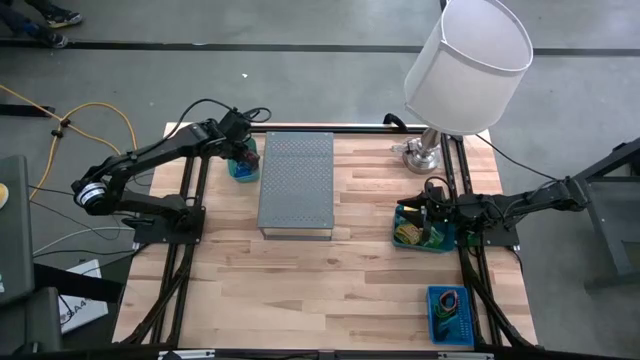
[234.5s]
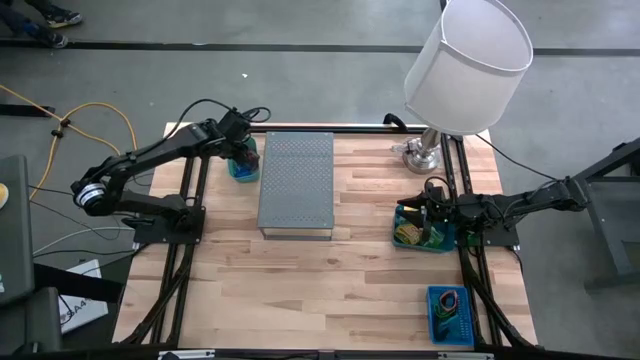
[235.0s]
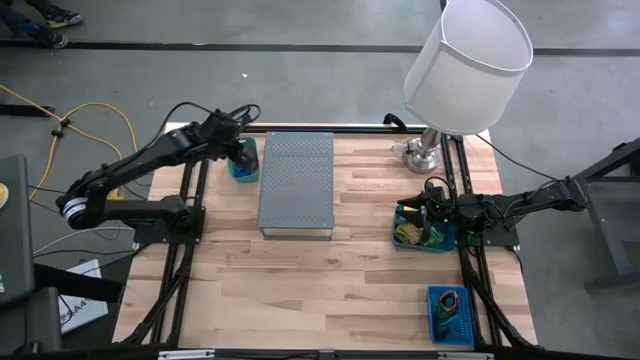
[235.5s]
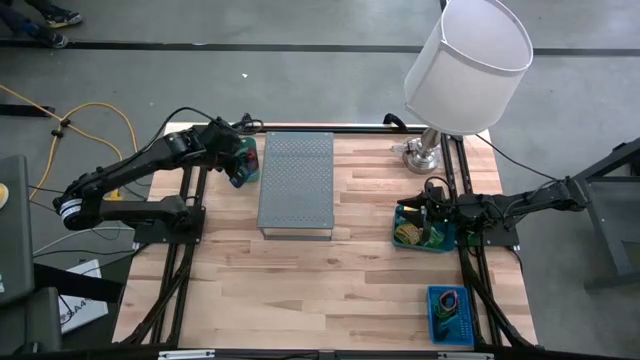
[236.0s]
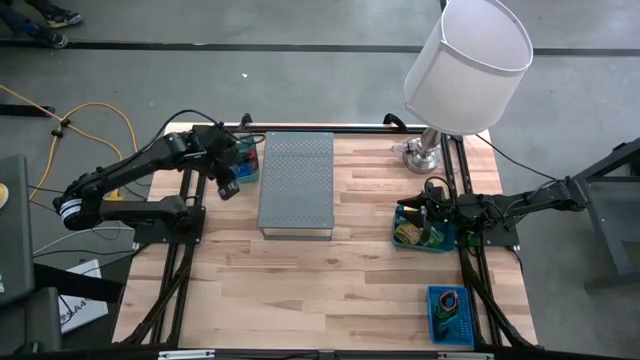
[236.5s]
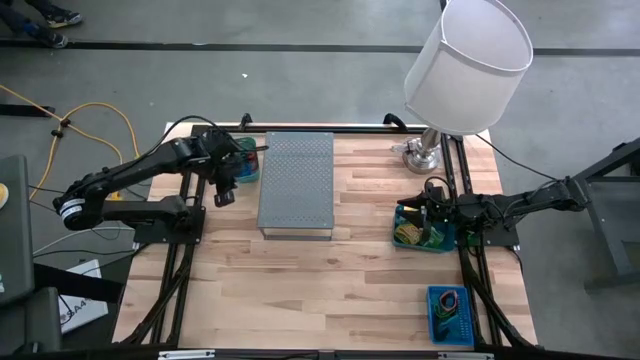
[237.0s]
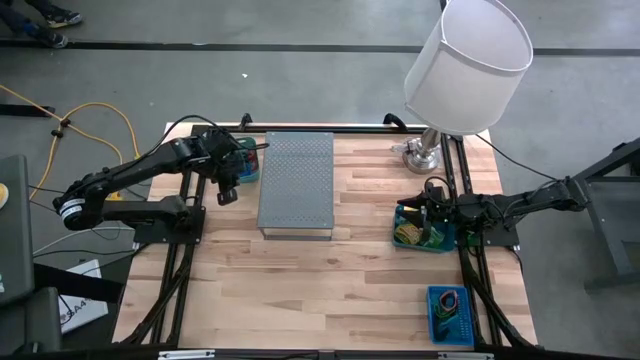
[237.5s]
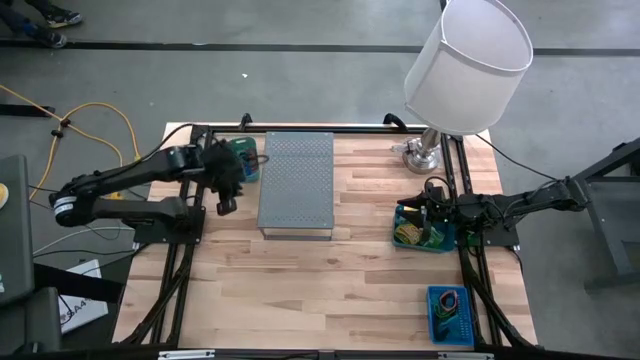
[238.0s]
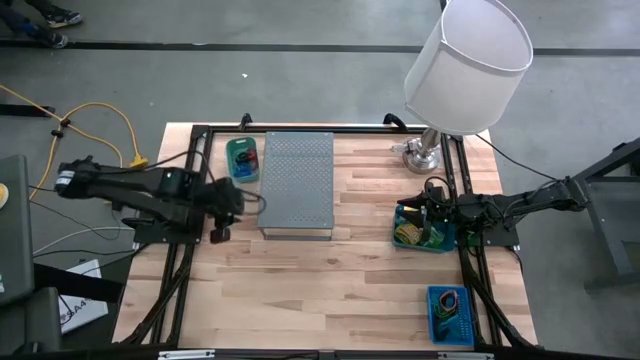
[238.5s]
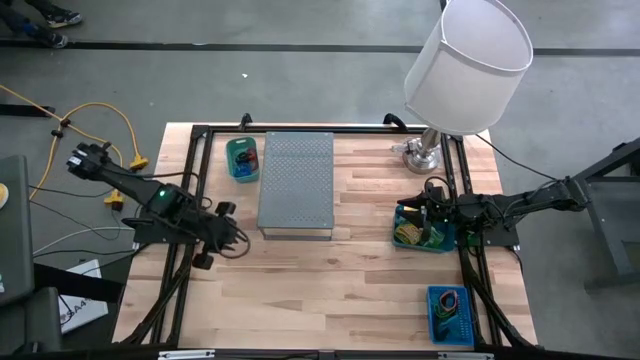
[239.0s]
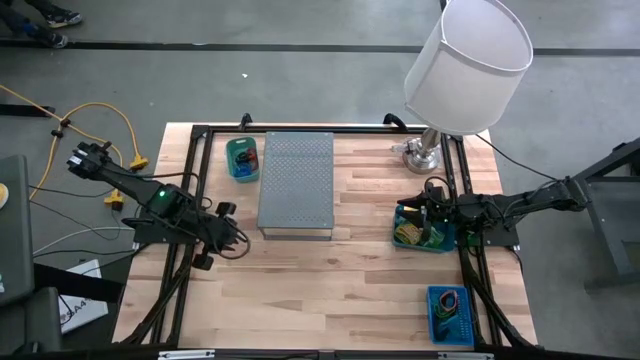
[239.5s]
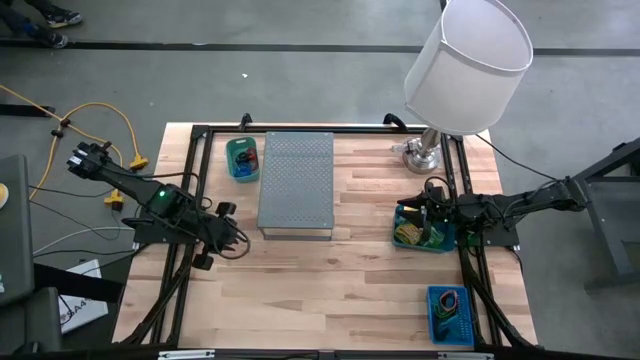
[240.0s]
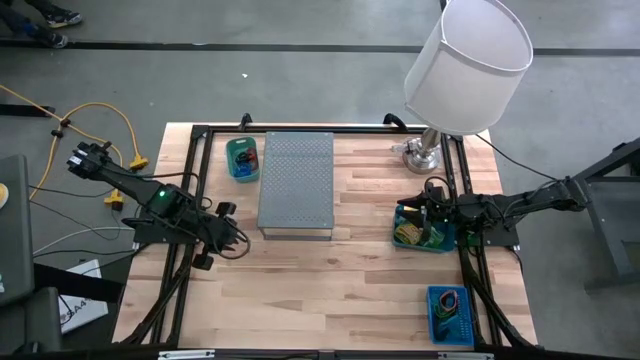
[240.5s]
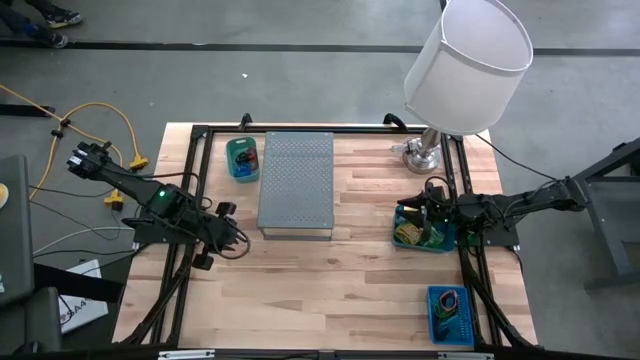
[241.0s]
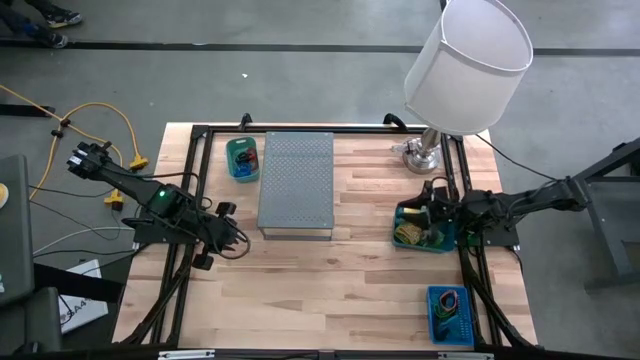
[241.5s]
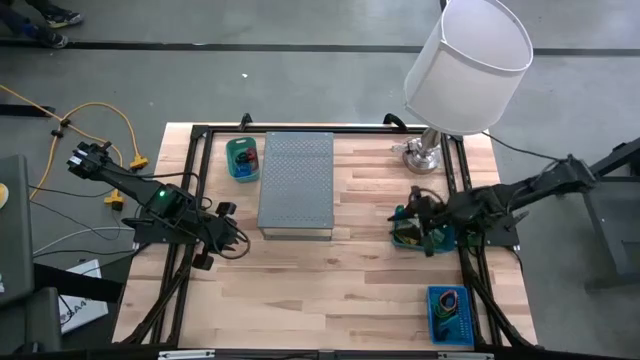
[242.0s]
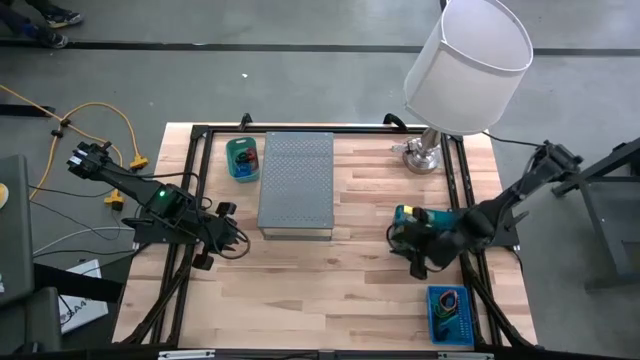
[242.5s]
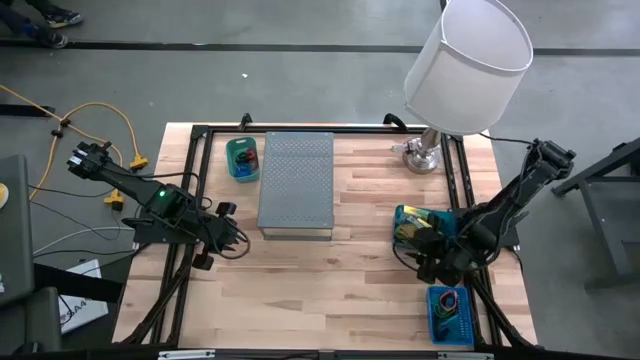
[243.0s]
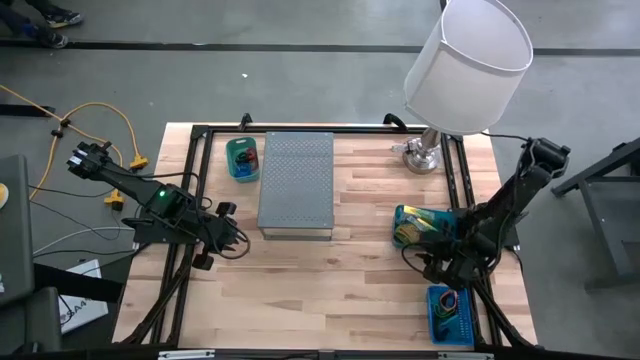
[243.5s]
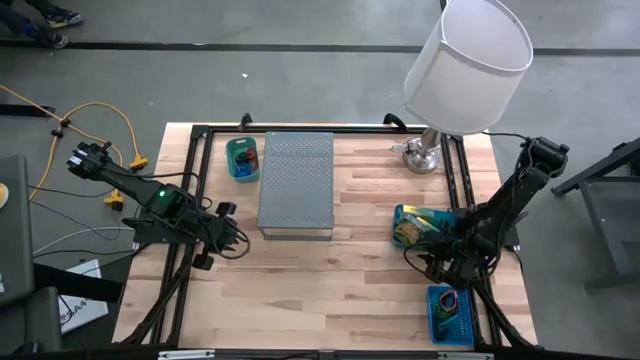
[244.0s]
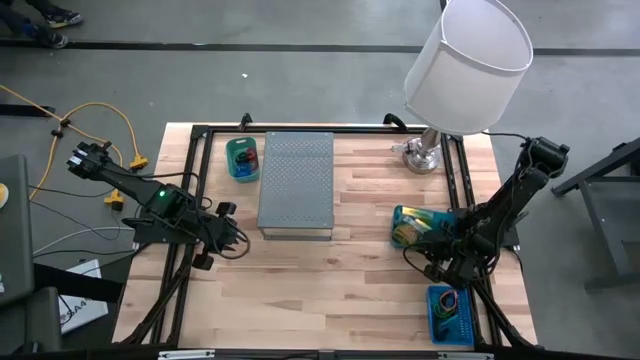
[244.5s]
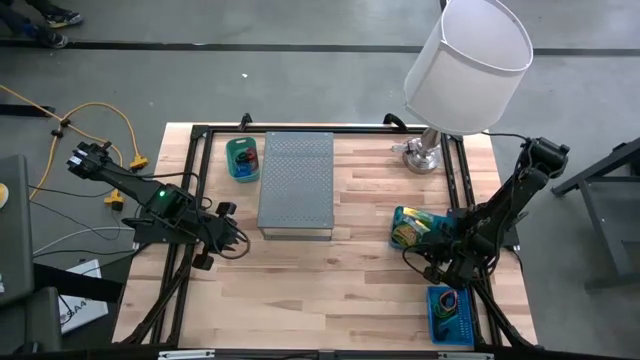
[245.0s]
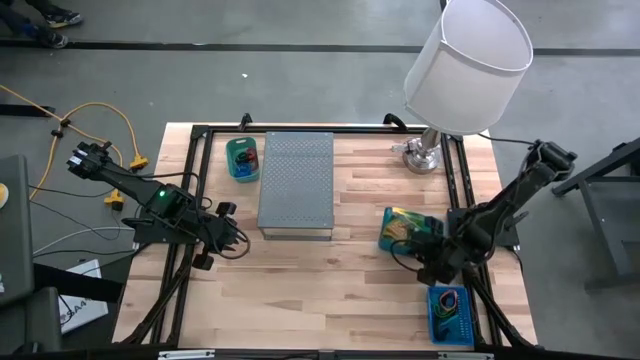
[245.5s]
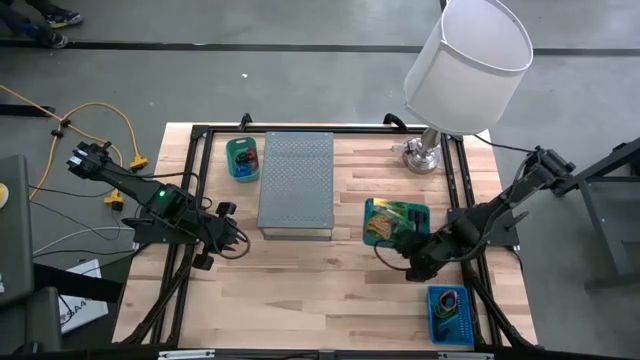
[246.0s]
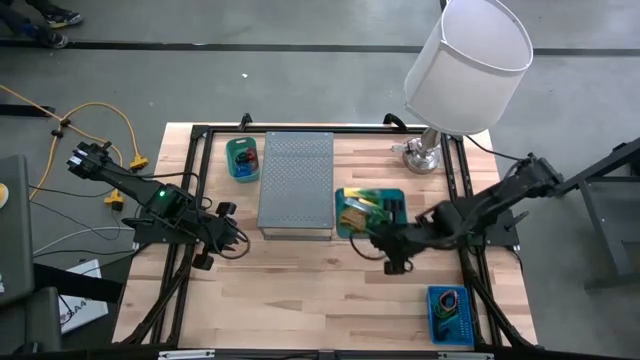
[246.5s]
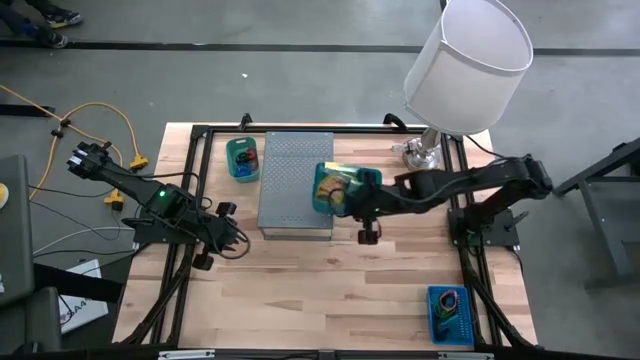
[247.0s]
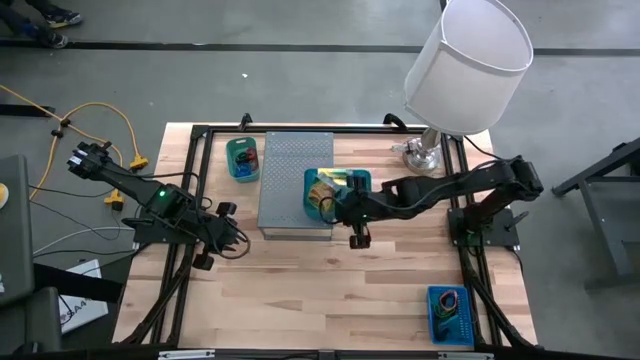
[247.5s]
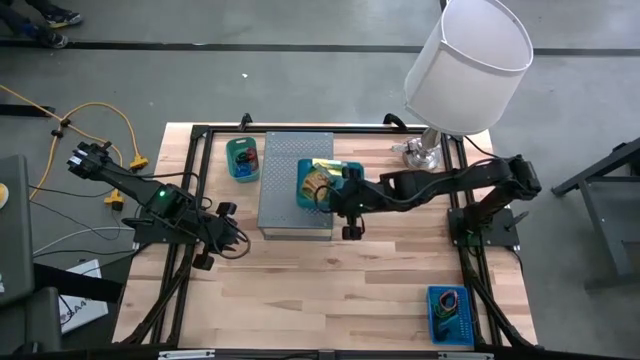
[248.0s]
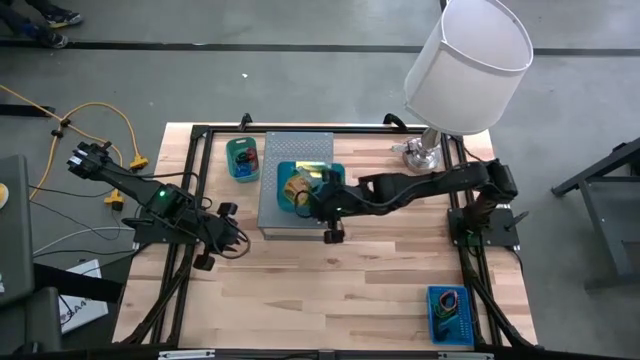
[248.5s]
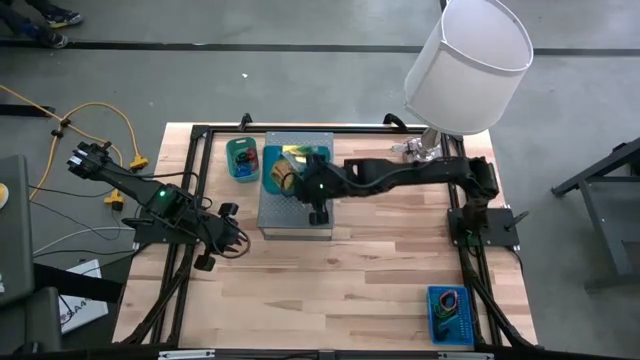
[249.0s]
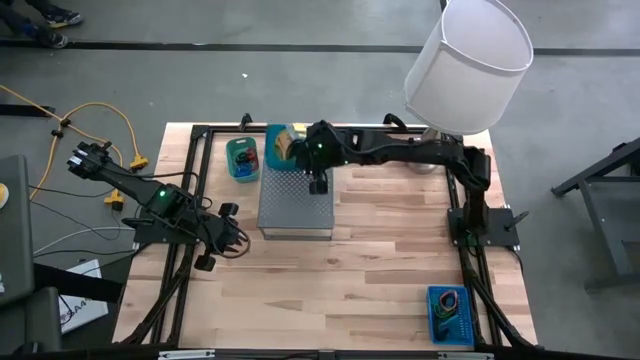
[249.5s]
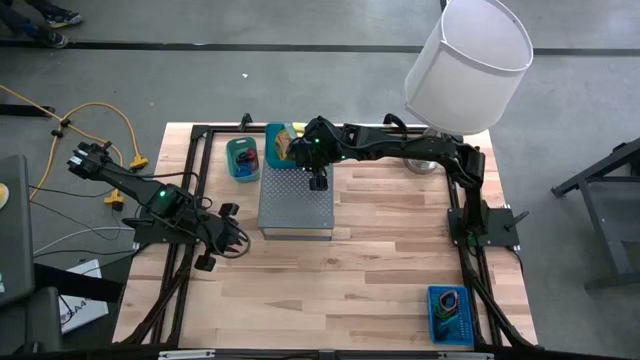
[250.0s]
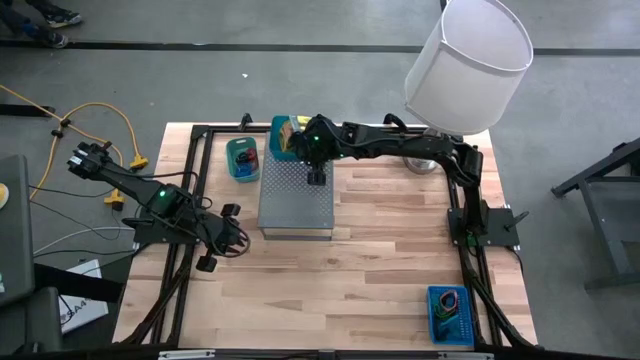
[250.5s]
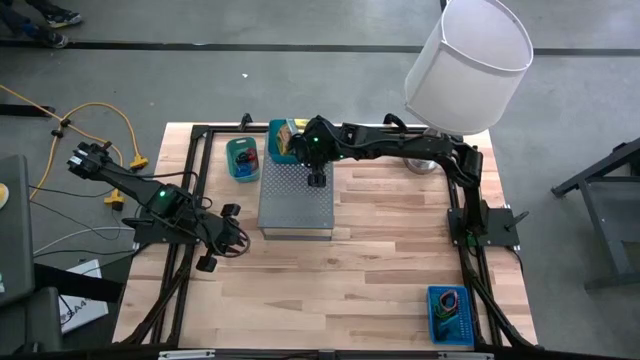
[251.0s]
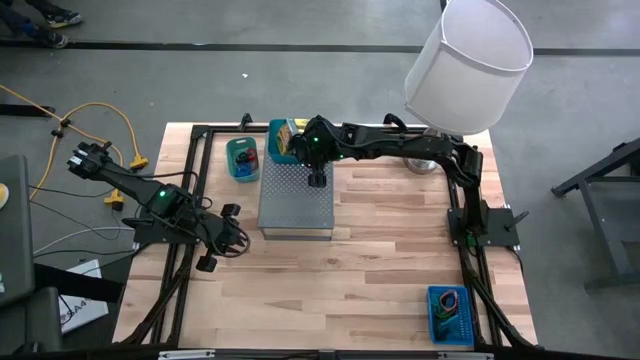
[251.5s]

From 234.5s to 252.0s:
Task: Pick & Place Office Desk Supplies
Put the blue bin with crayon boxes on the shelf

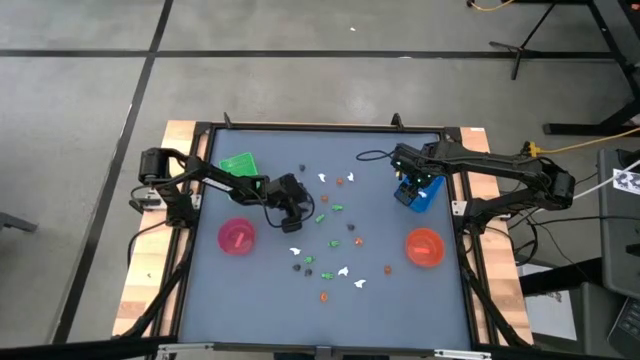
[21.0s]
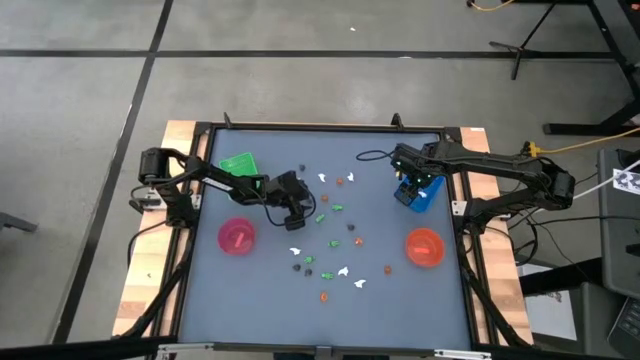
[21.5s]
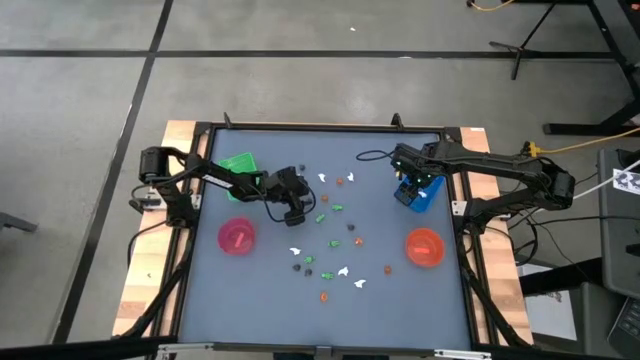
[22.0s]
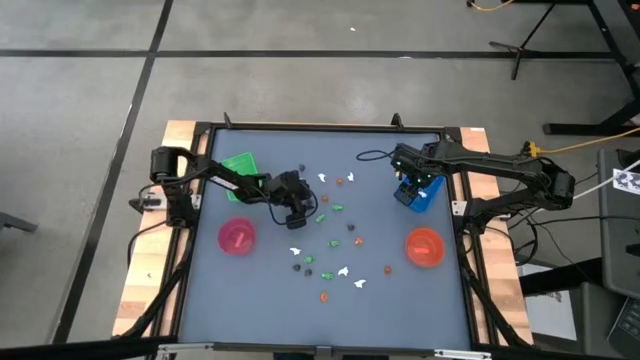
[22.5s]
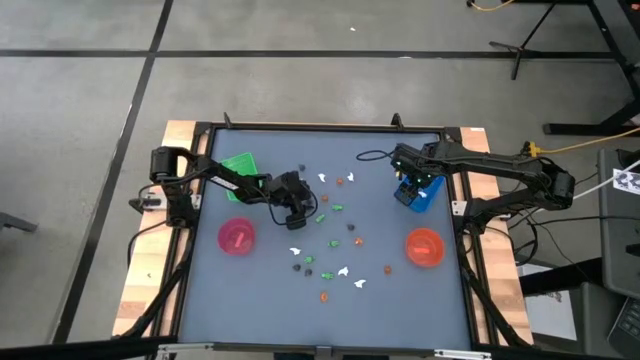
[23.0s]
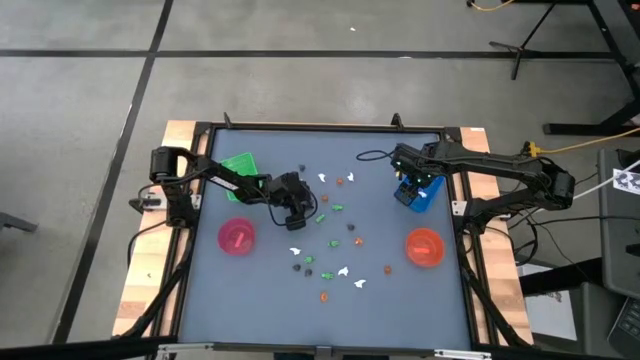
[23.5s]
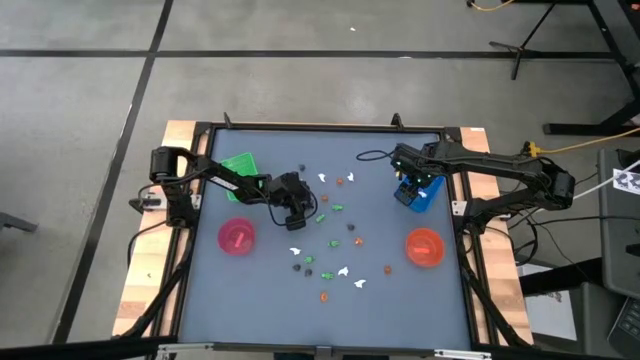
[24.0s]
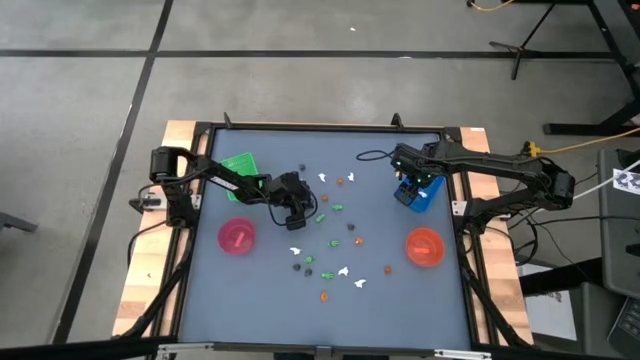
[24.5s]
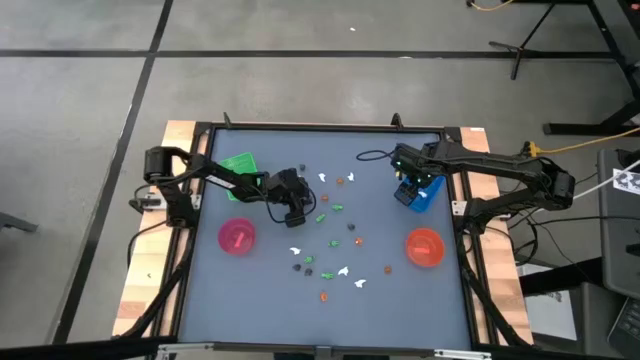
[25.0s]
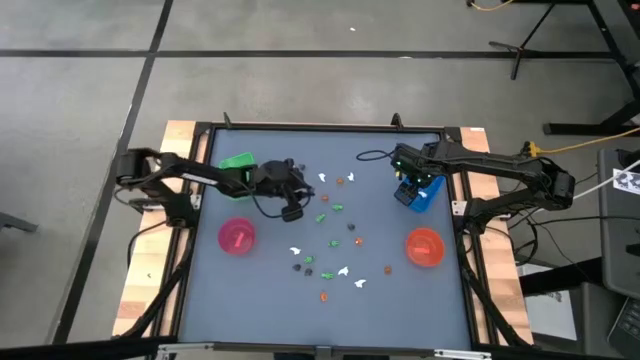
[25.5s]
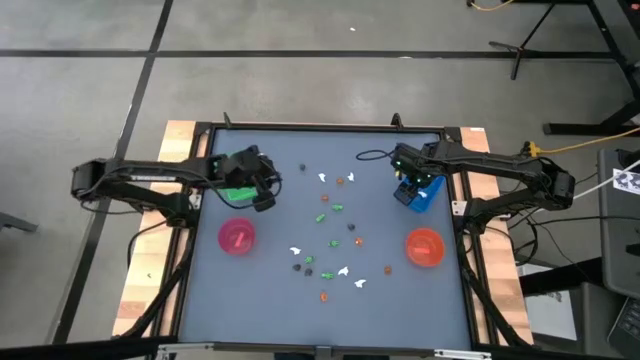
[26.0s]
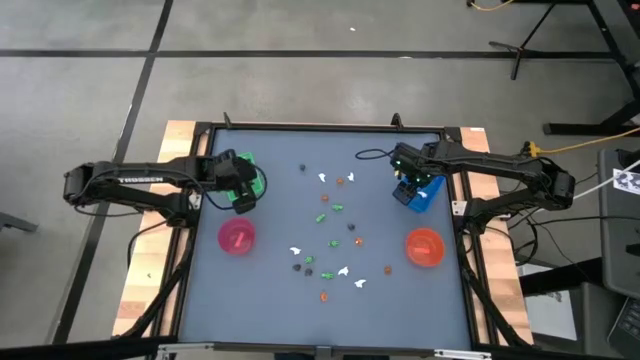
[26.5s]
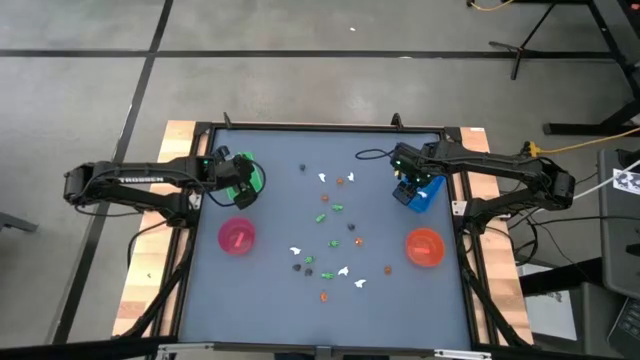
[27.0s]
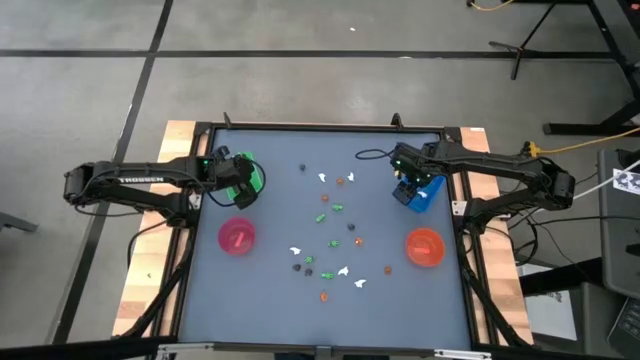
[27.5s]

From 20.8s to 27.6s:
Task: Sort Halloween decoration
Put the small black skull toy into the green basket
